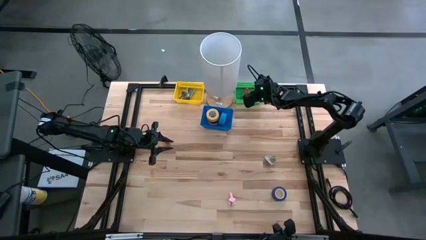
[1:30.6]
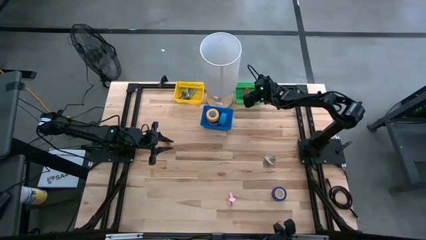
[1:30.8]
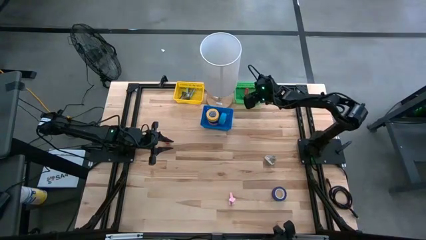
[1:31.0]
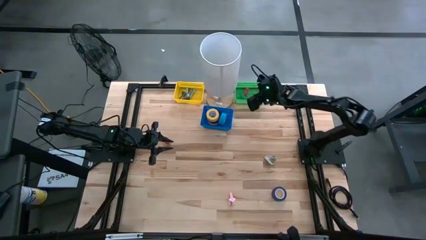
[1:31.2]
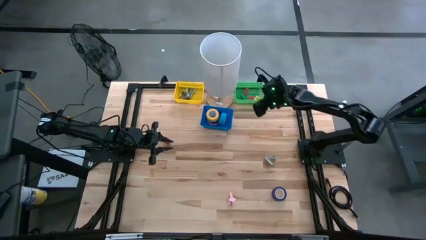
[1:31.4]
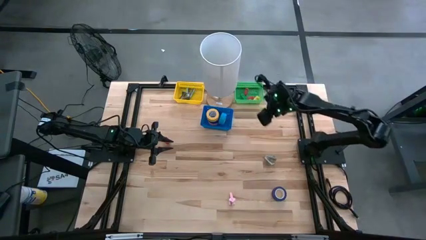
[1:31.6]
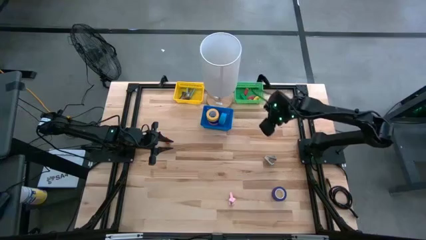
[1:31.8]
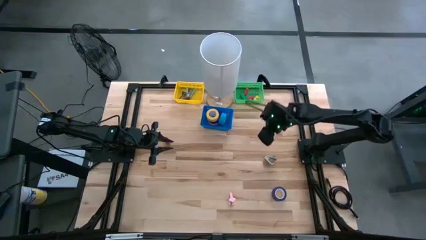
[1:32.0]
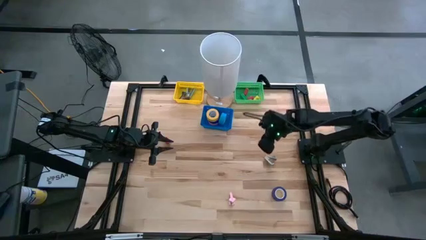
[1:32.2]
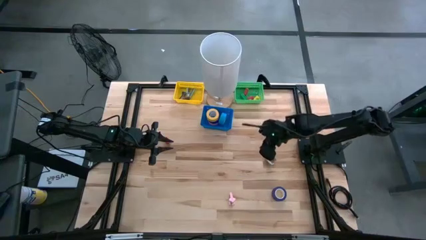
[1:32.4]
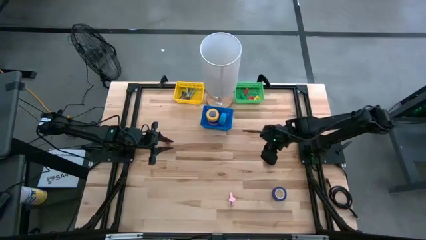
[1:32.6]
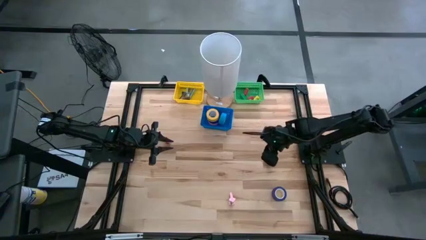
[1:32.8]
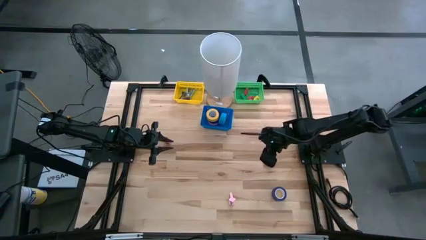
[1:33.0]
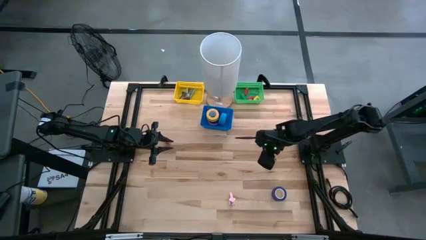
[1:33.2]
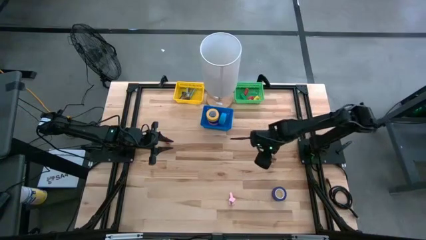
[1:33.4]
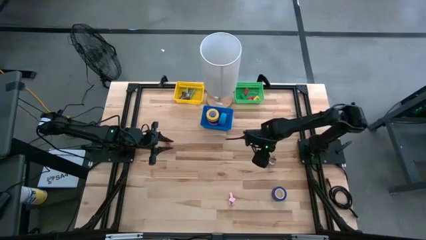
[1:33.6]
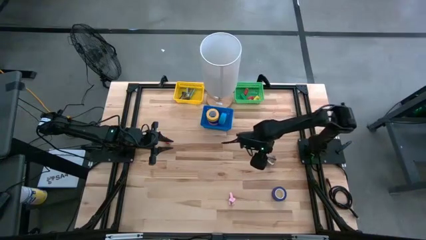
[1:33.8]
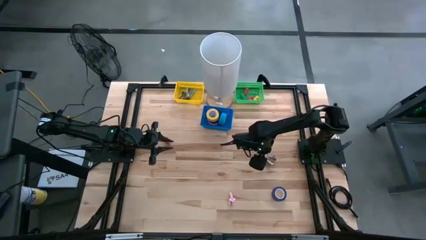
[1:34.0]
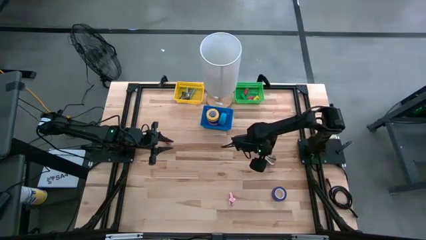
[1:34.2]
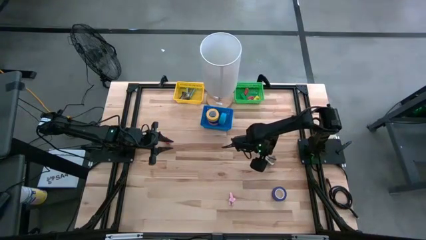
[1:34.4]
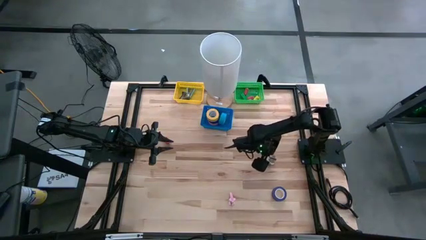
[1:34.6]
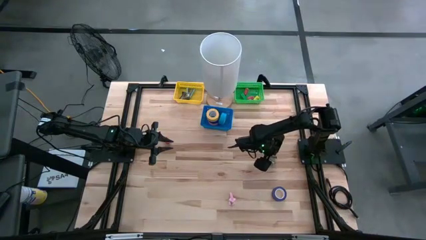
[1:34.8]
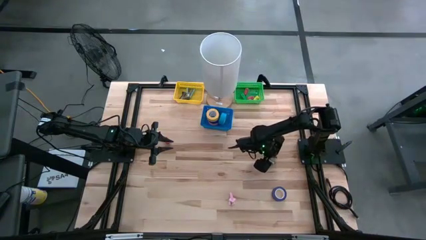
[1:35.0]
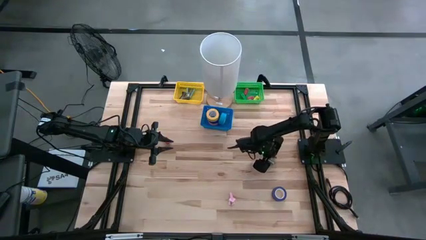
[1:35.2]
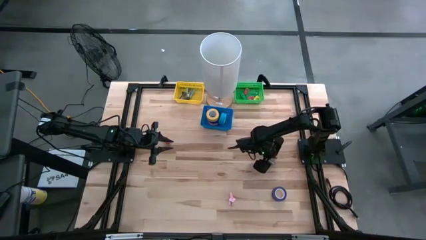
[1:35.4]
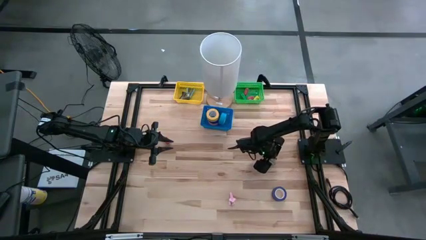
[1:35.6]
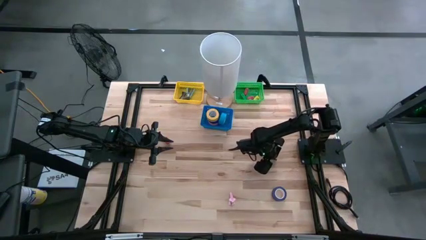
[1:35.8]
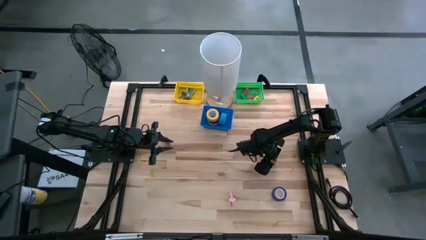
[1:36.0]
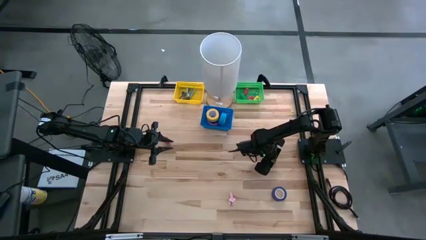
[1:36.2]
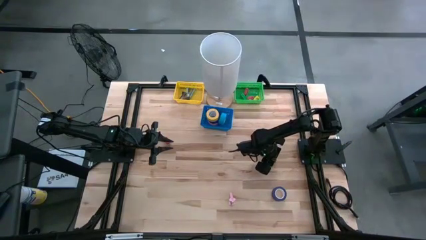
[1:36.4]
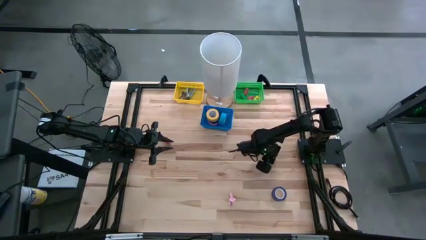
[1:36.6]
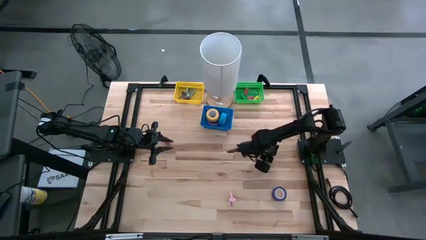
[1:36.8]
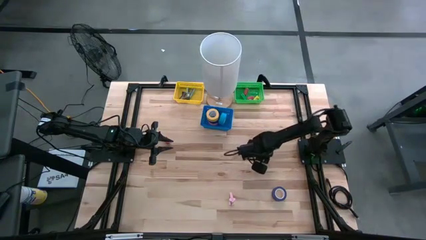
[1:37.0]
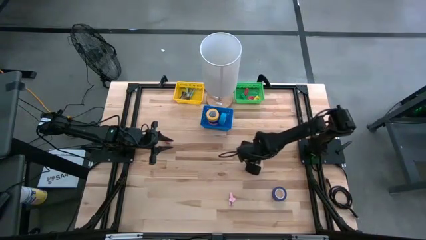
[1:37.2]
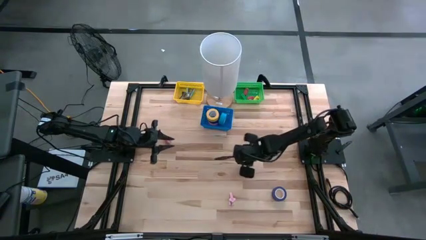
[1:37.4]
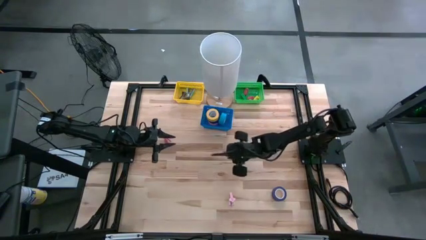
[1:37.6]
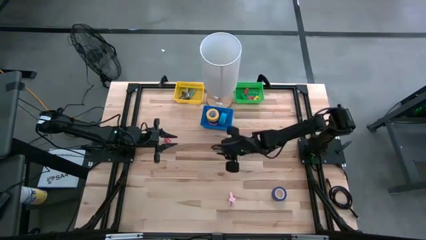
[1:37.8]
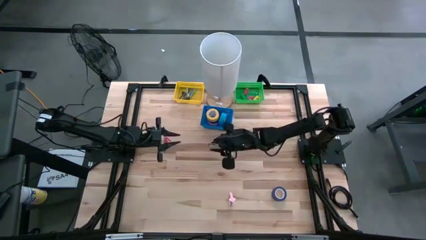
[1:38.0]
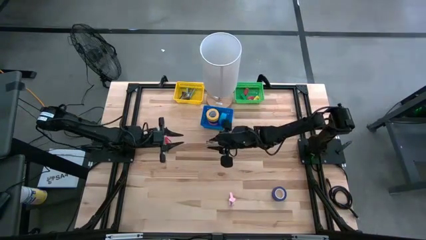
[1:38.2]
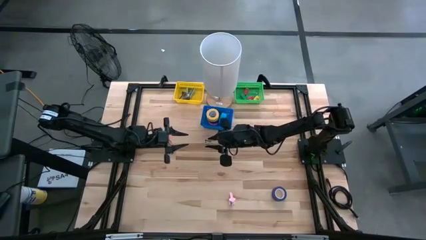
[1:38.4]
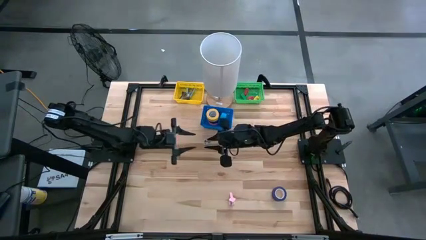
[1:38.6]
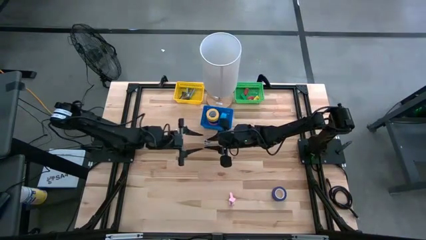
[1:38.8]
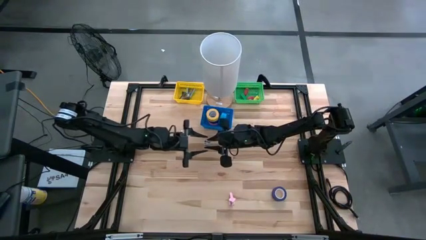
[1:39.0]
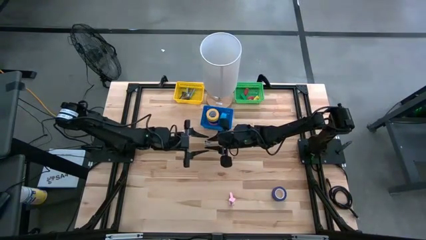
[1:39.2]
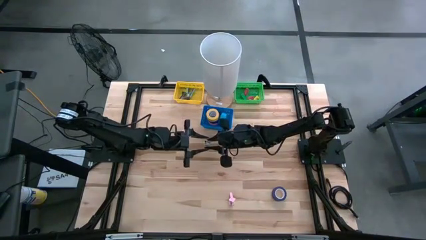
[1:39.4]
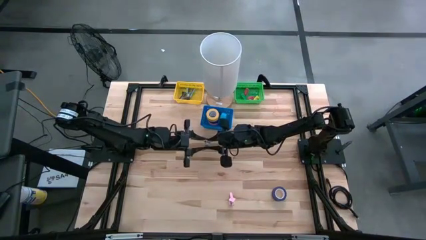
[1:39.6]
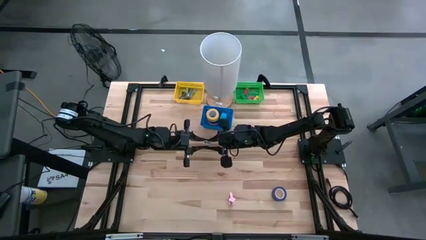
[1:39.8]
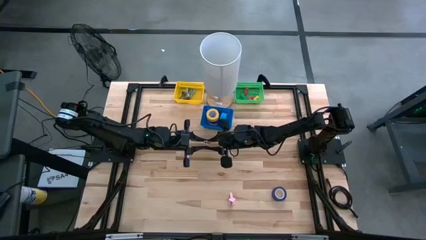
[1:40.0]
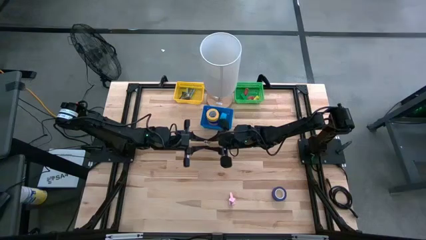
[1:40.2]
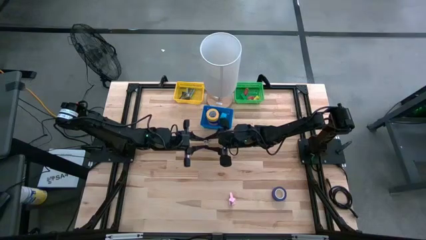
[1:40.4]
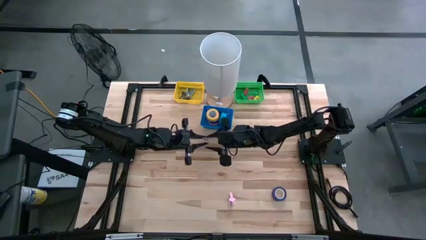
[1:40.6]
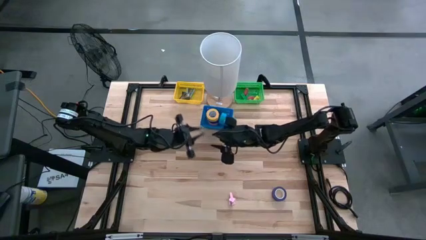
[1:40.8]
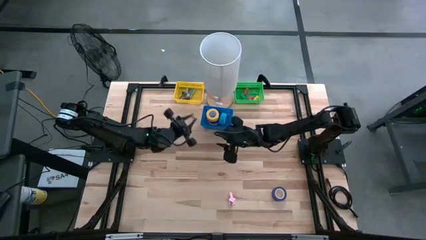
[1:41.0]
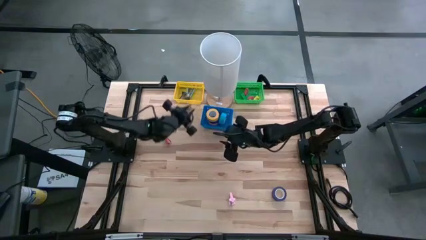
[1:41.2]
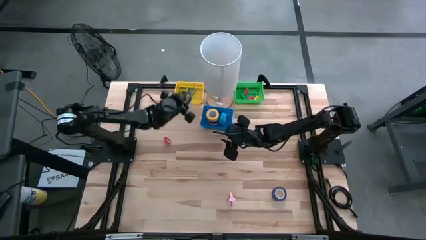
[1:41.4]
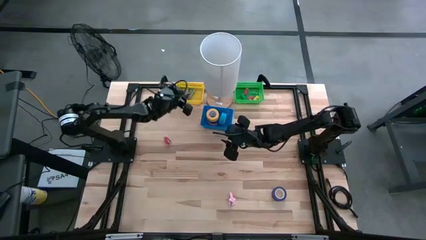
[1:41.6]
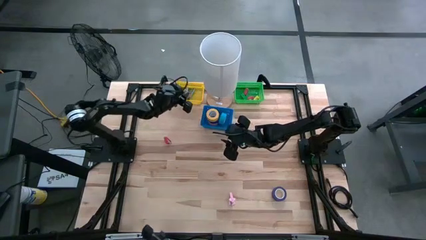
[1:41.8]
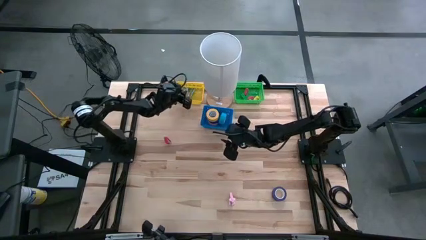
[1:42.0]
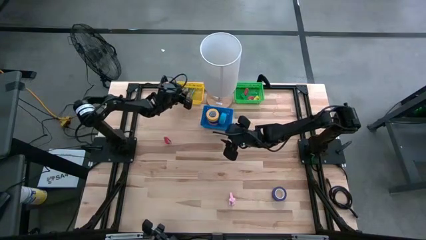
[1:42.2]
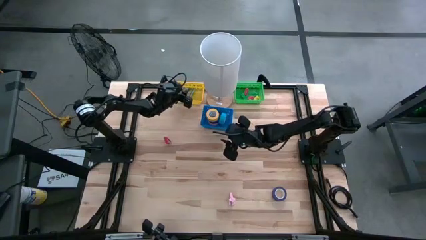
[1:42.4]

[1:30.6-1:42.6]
Task: Pick and place Stapler, Stapler remover, tape
Put the gray staple remover into the yellow basket

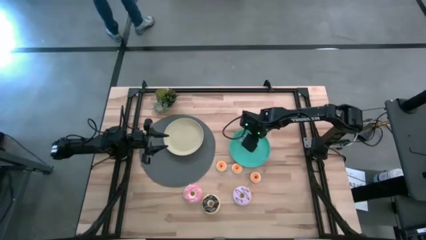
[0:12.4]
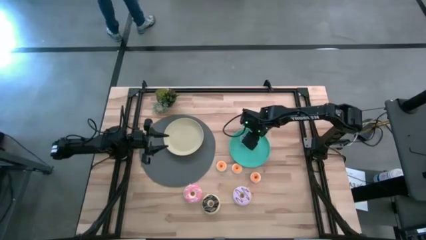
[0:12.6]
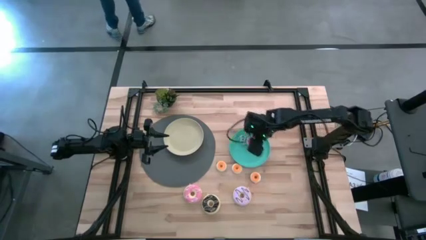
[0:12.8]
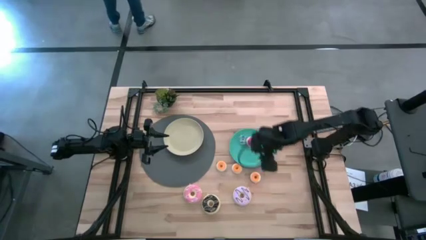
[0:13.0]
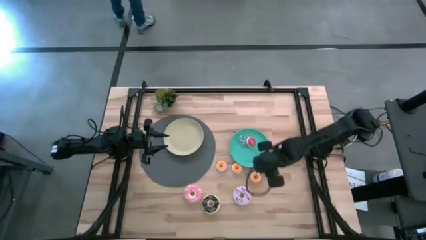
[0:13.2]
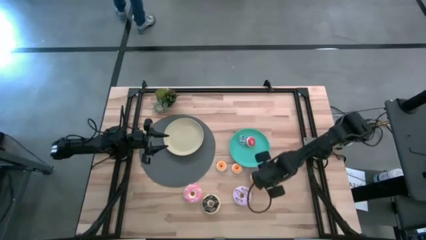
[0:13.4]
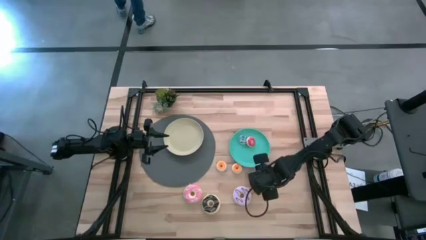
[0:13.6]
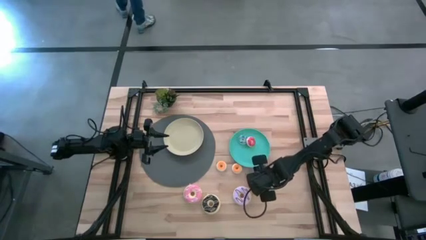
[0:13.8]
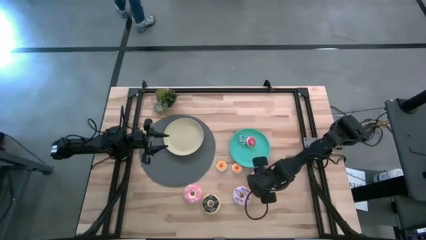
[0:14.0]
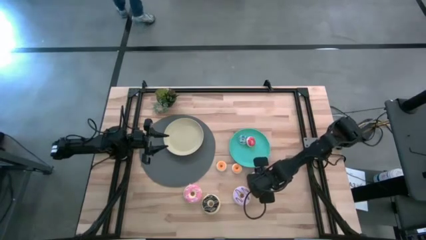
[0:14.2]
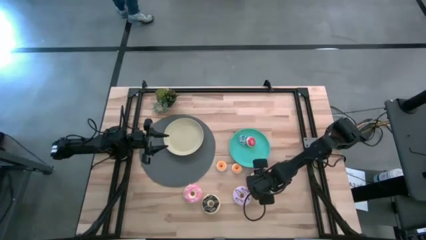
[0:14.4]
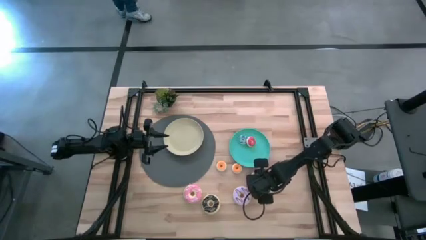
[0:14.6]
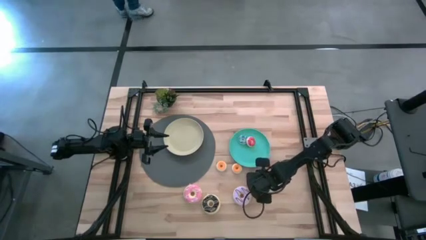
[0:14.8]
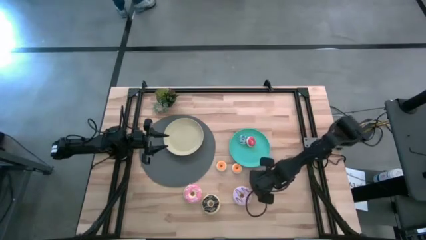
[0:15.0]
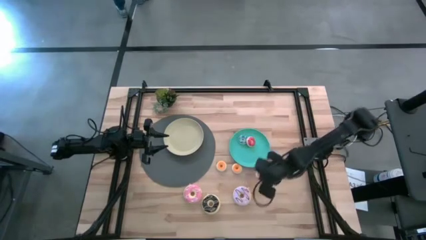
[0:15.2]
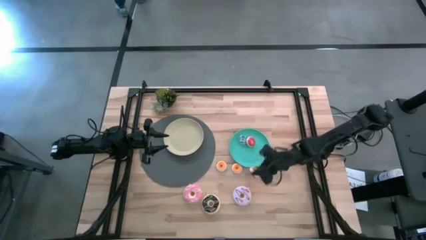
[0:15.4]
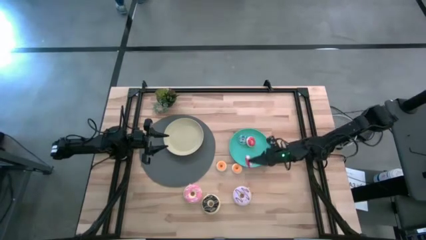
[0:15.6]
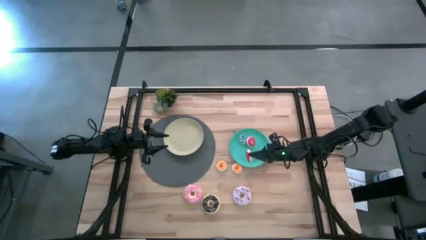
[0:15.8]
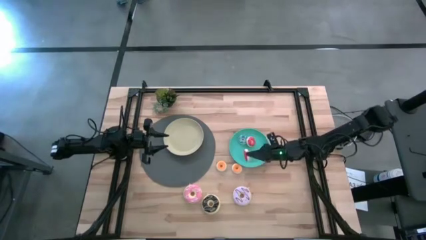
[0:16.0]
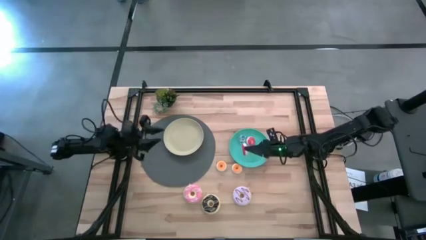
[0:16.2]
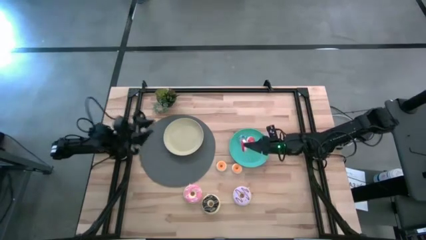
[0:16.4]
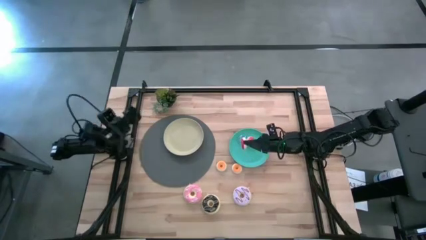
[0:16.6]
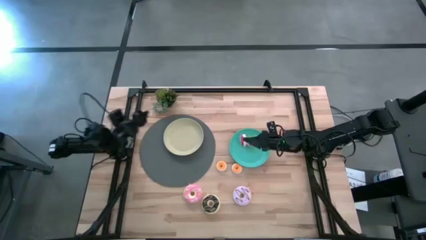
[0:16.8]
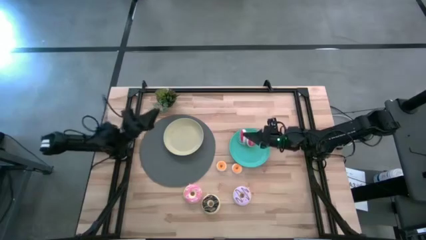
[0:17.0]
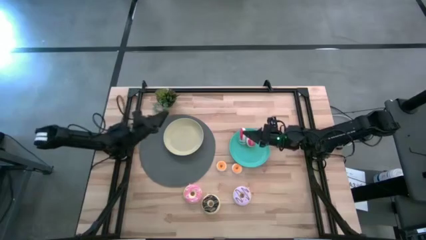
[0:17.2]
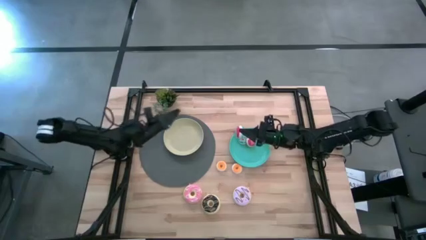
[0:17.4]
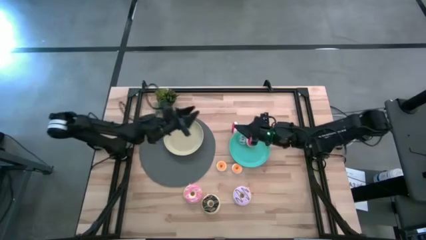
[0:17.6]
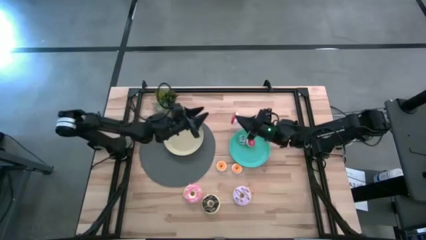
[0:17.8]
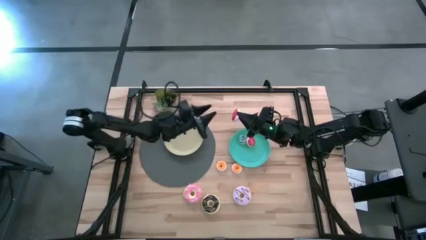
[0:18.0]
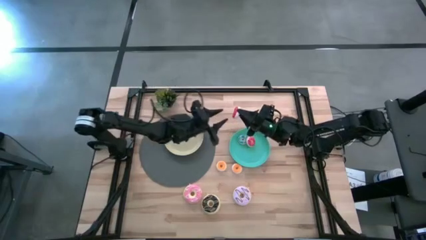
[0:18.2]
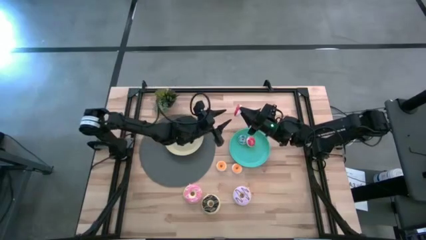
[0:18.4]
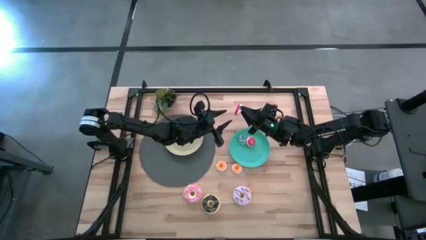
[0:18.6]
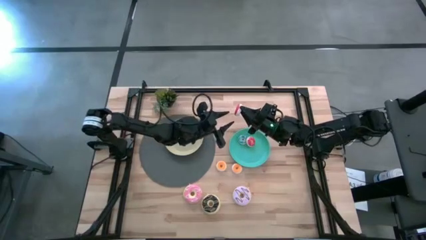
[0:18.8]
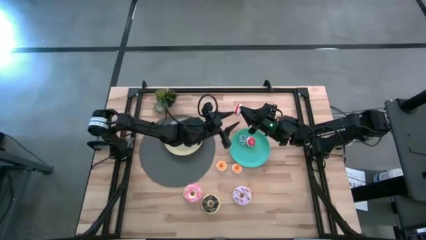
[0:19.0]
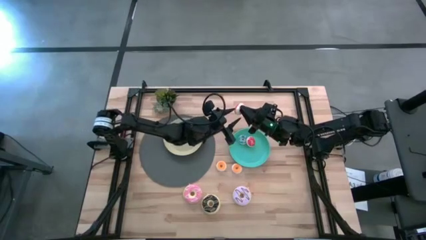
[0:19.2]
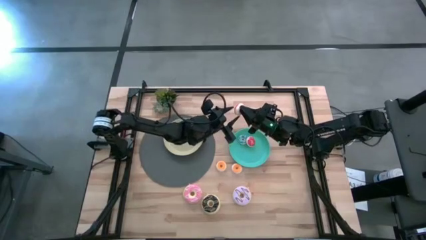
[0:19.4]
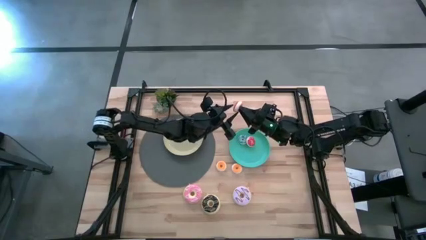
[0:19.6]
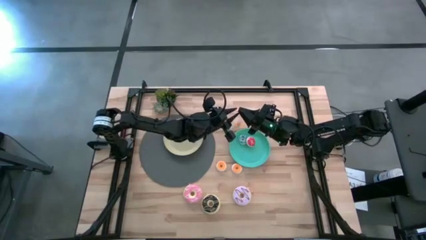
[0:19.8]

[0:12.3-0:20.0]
Task: Pick & Place donuts
Put the small right red donut on the light blue plate
